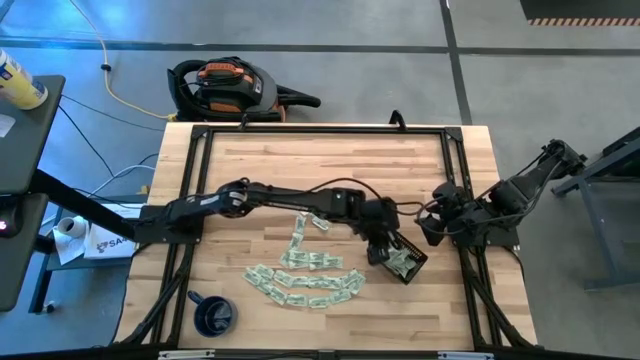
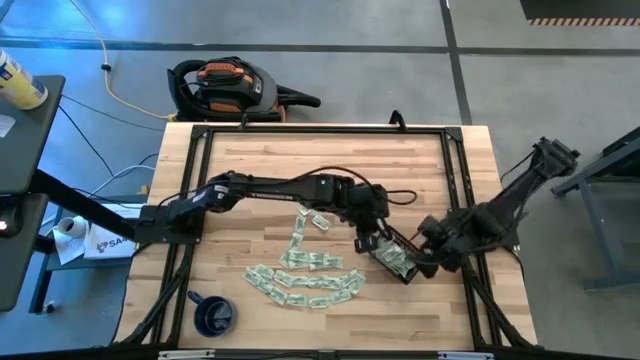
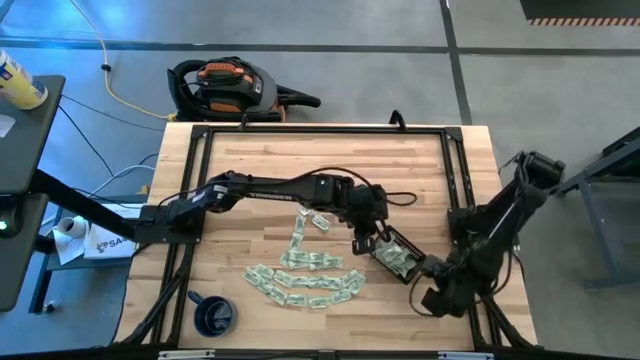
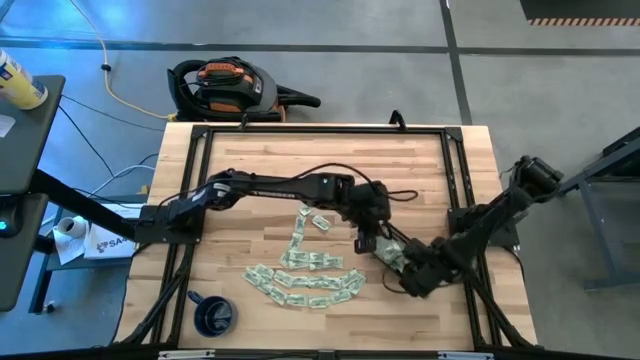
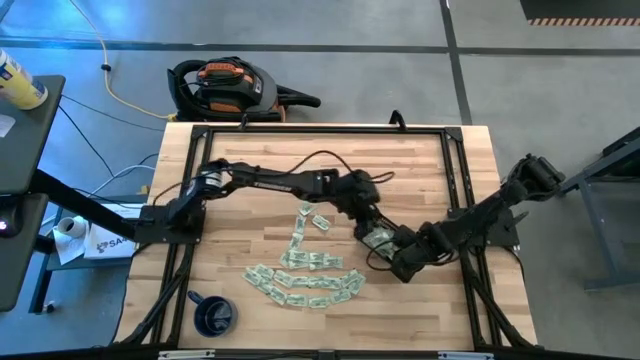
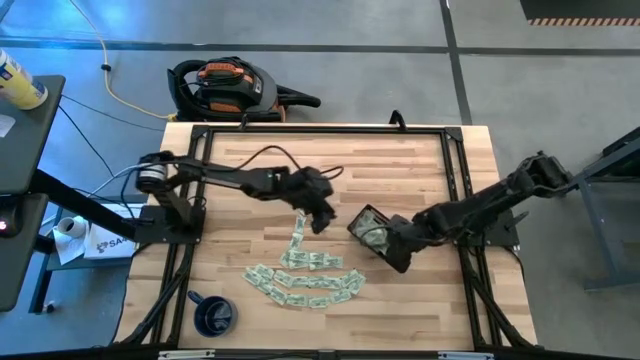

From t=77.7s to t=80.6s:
Task: Pick and place Stevia / Truvia into bins
Adjust the black bin

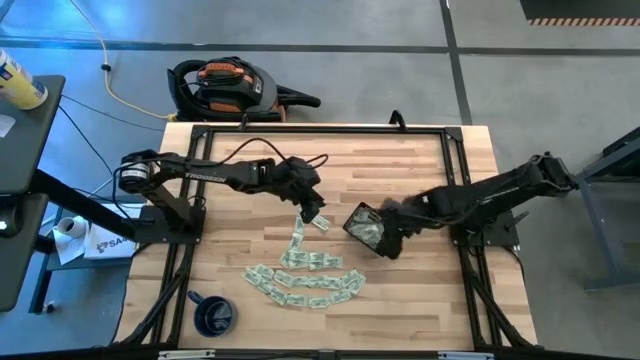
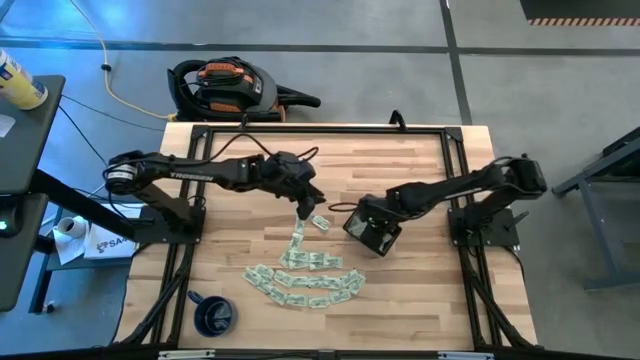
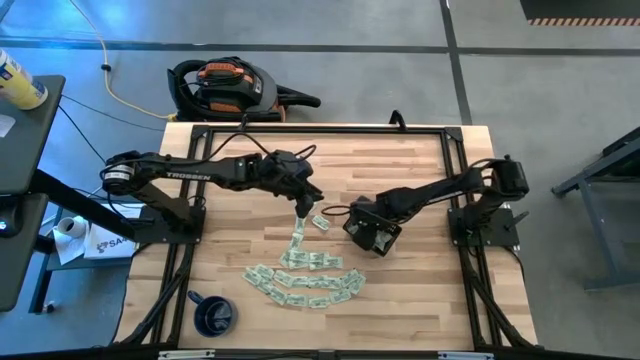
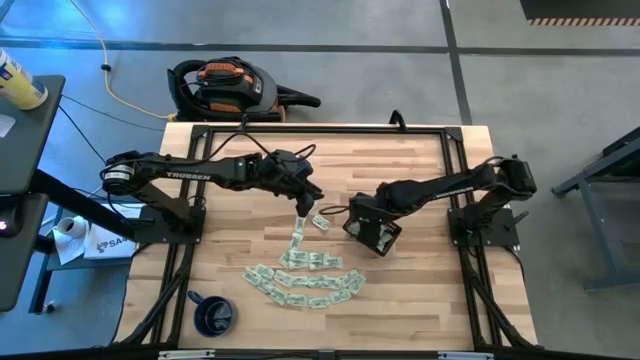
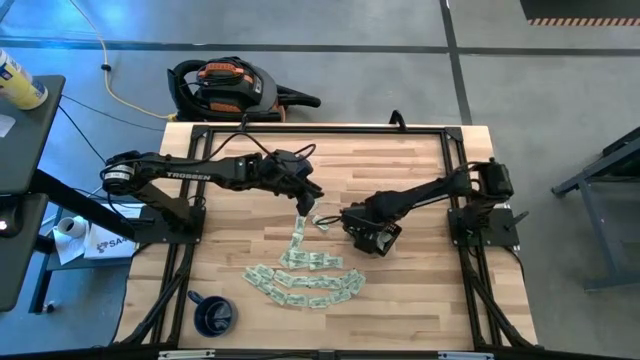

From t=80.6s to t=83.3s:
Adjust the stevia packets in the black bin

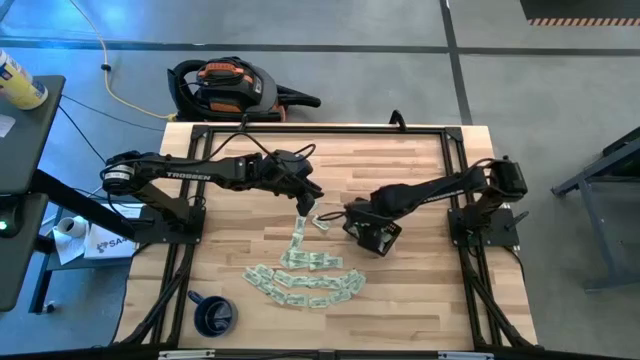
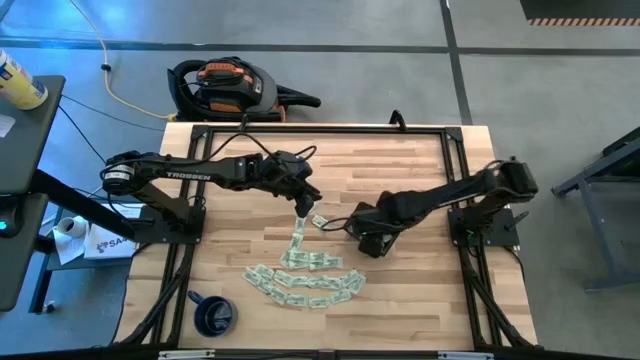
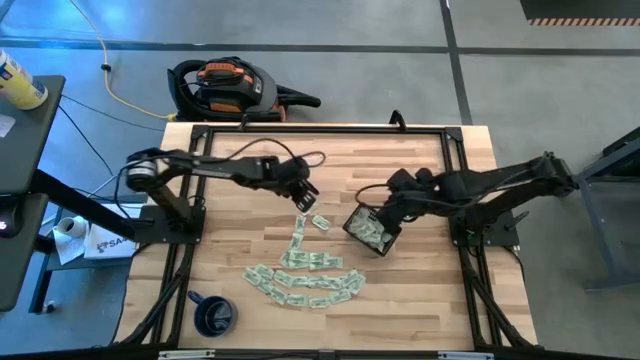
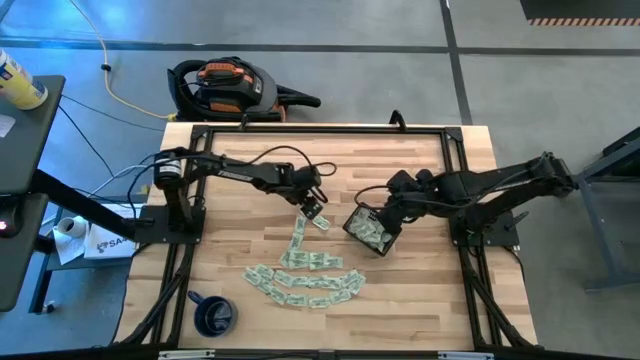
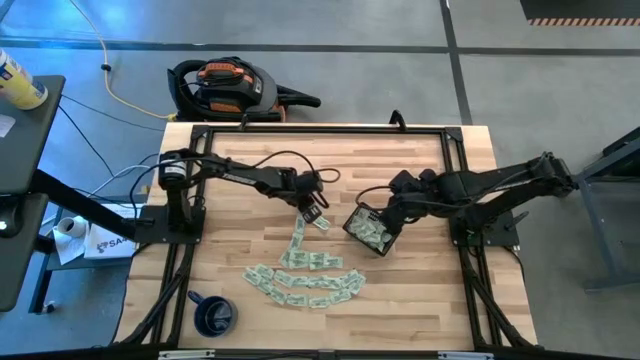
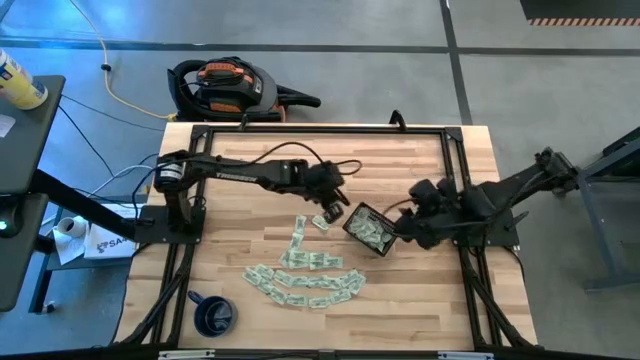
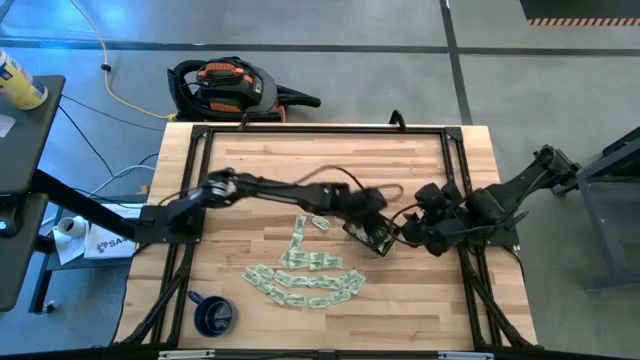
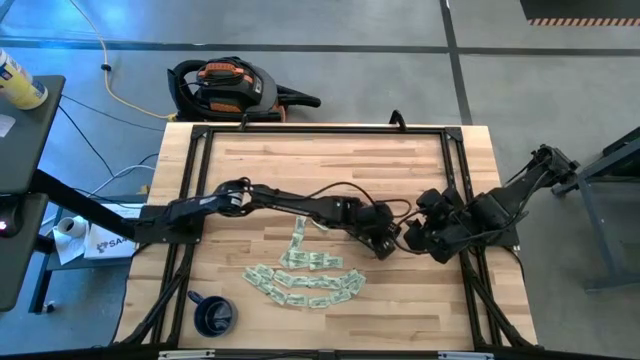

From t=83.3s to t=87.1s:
Put the stevia packet into the black bin

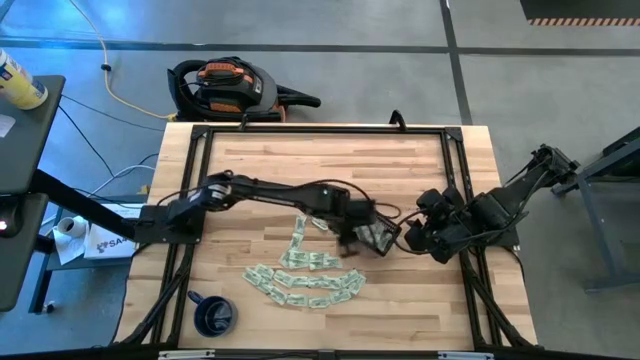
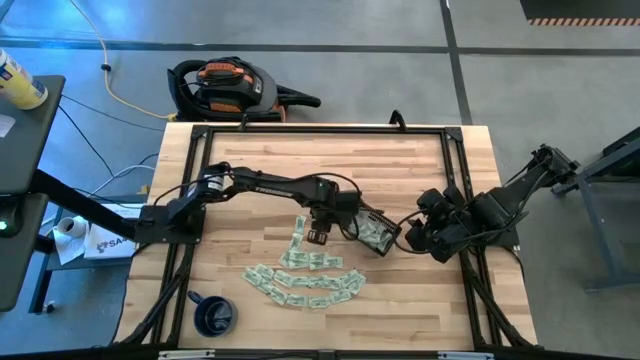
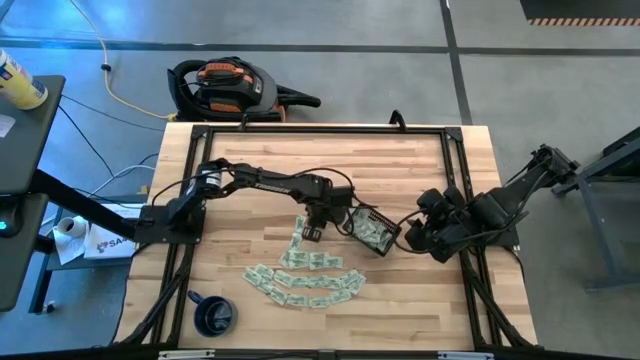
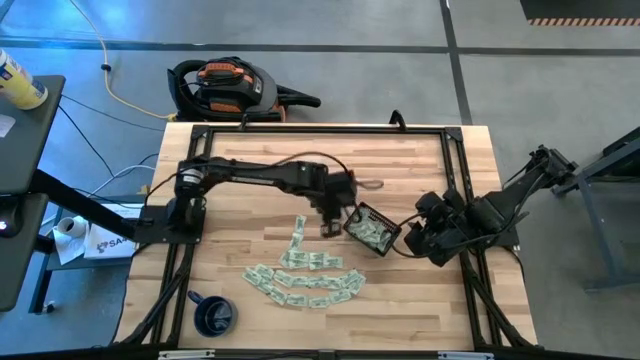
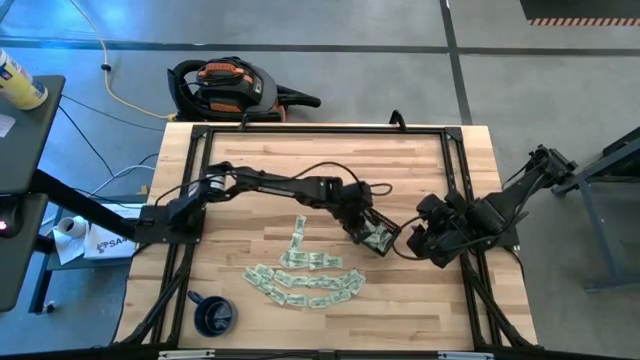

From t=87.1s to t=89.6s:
Put the stevia packet into the black bin

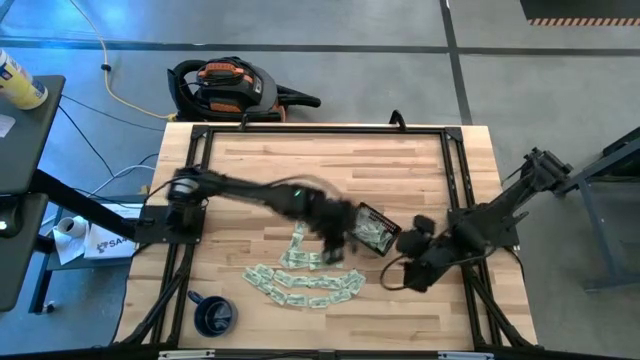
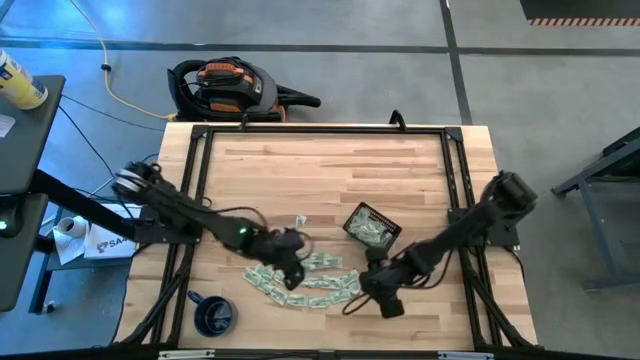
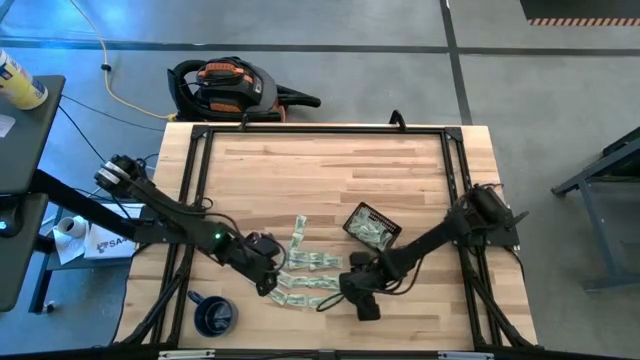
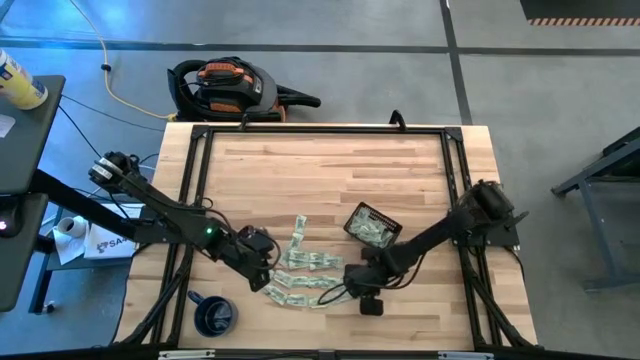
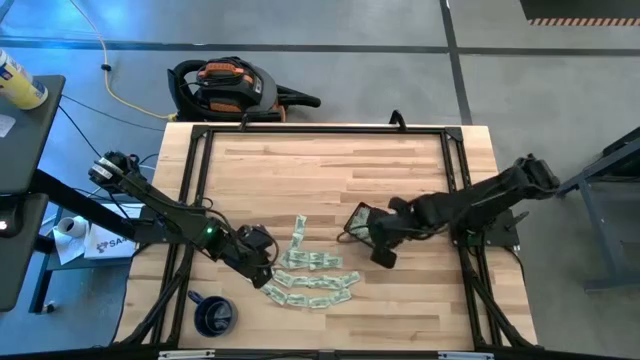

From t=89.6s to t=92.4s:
Put the stevia packet into the black bin

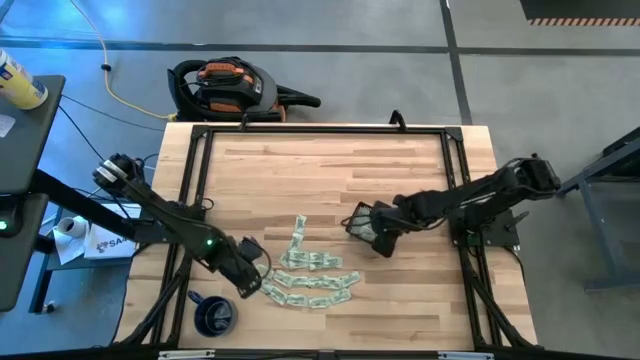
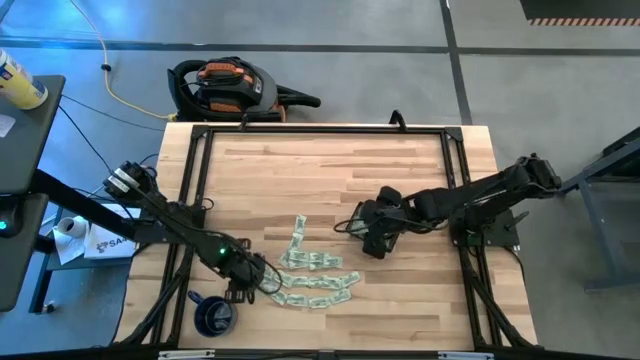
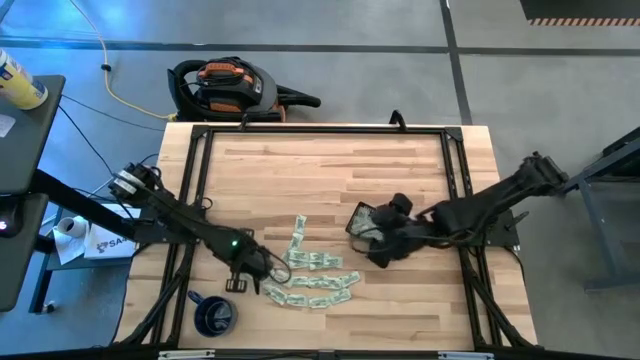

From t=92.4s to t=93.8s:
Put the stevia packet into the black bin

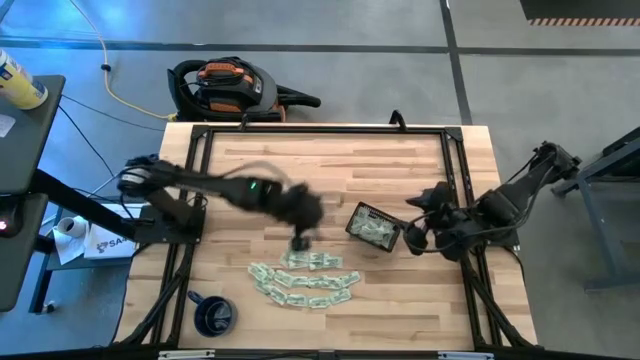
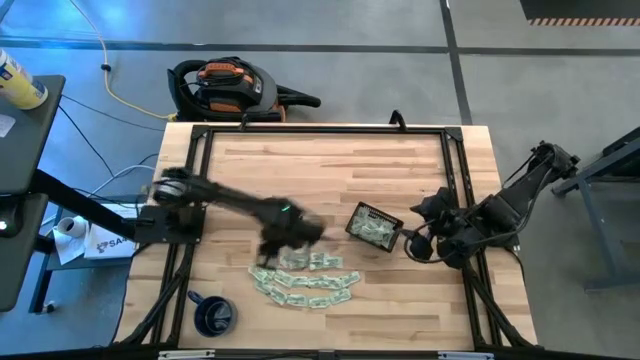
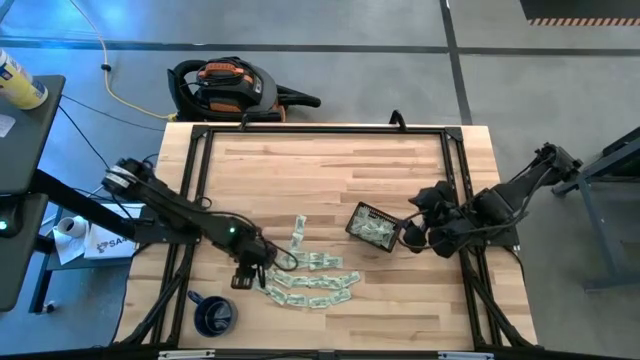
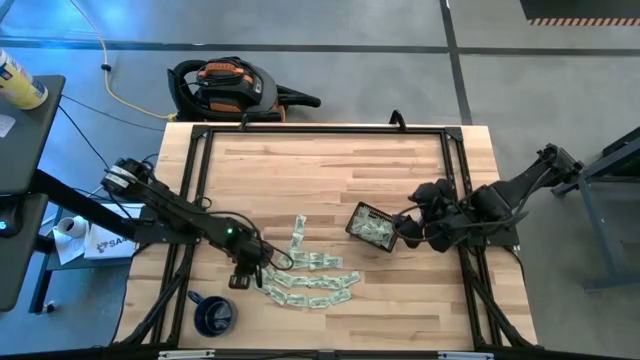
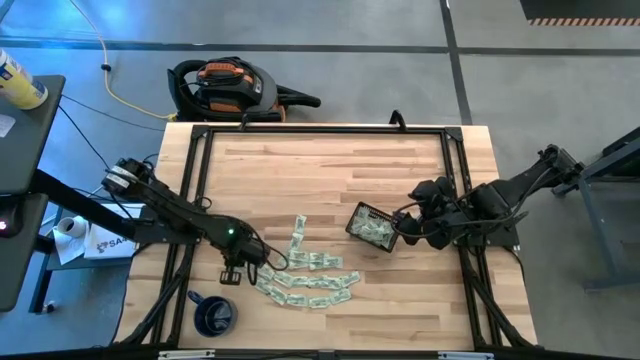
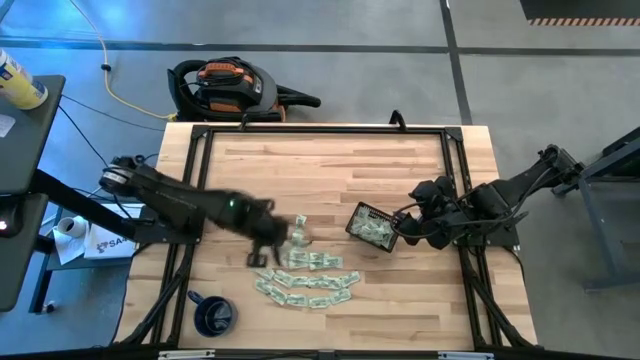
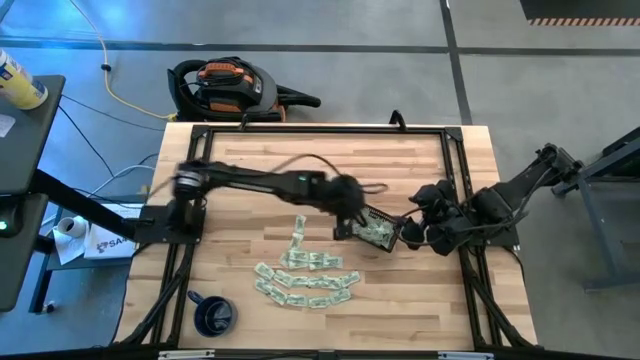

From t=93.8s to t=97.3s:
Put the stevia packet into the black bin

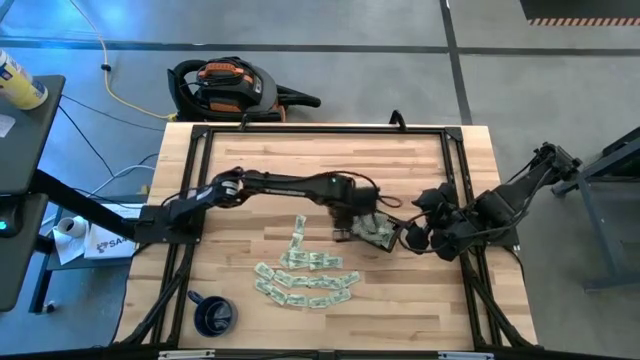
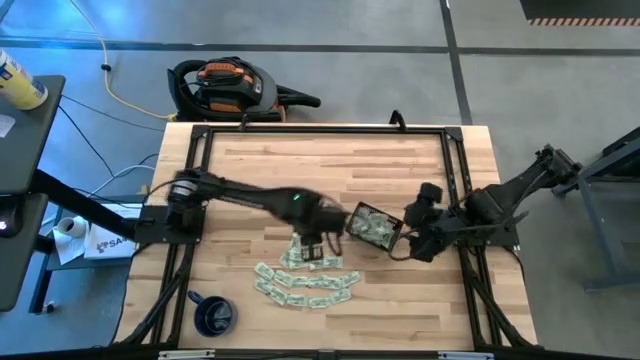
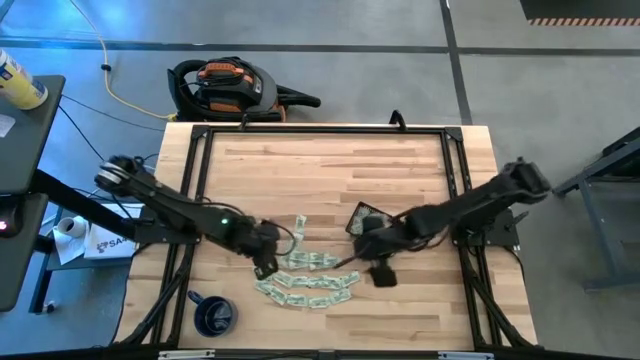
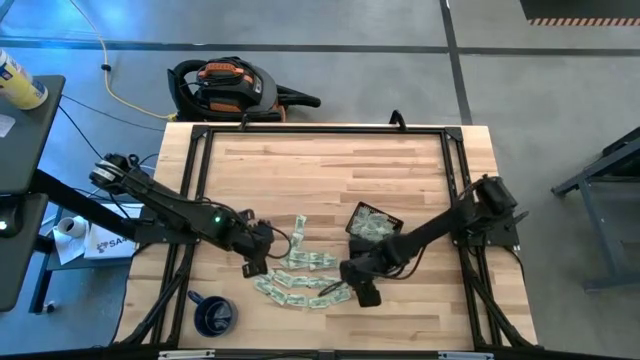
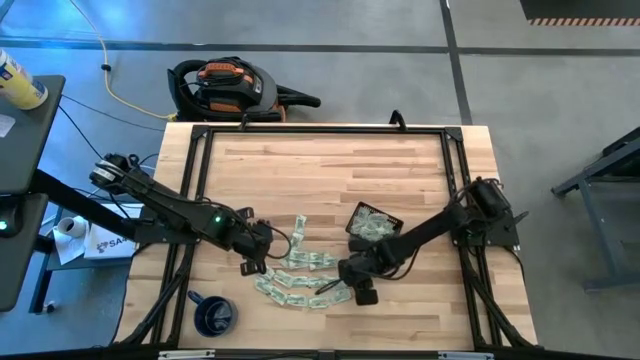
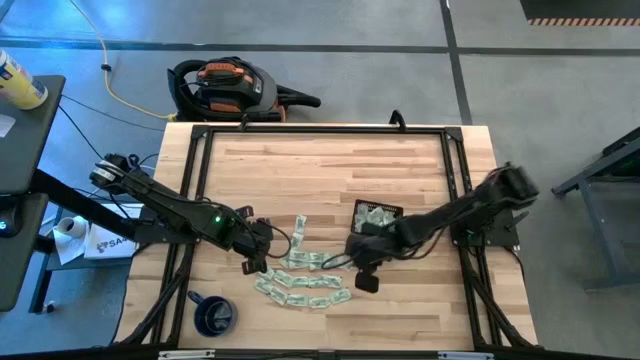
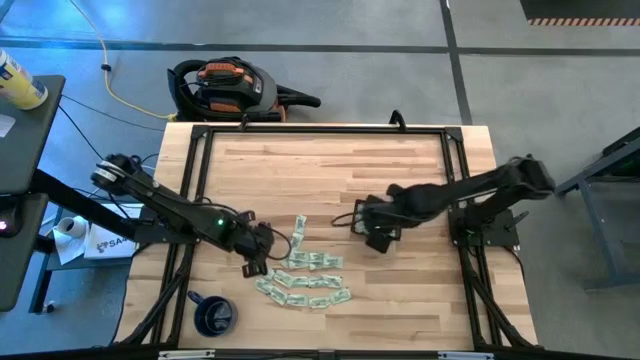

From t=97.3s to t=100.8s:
Put the stevia packet into the black bin
